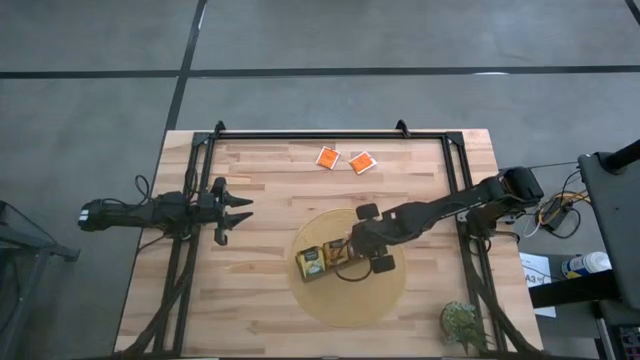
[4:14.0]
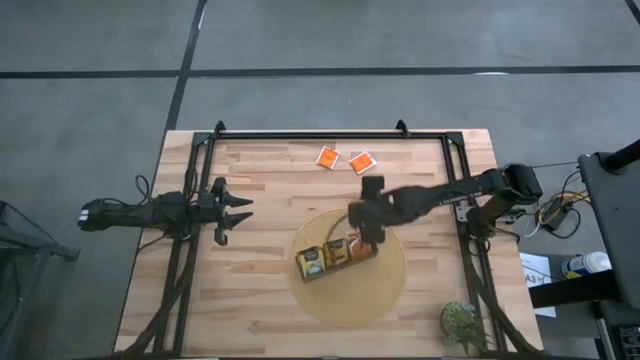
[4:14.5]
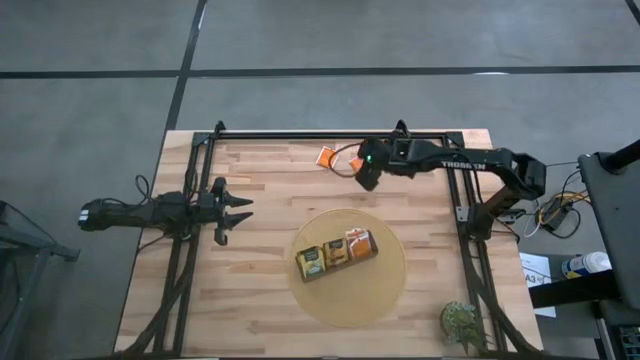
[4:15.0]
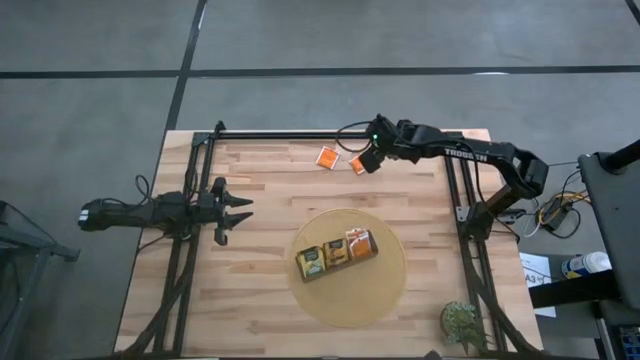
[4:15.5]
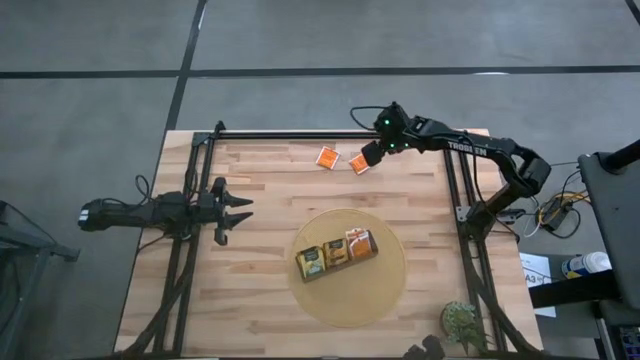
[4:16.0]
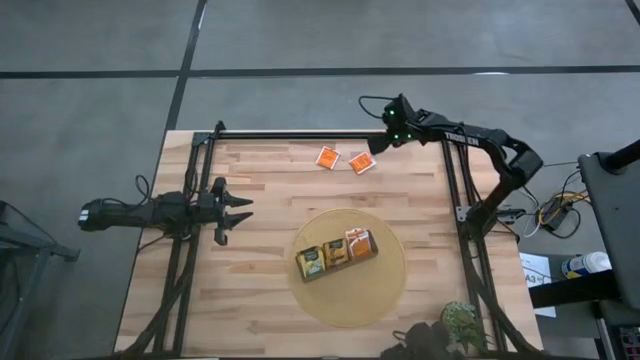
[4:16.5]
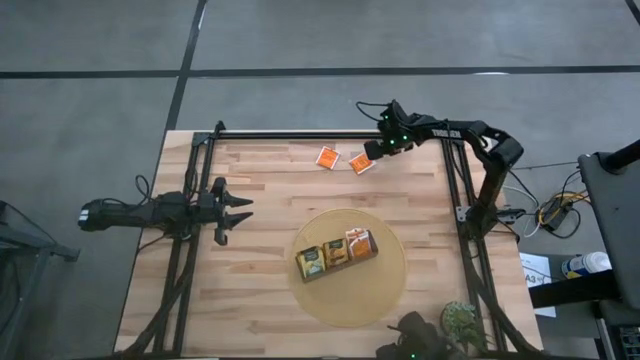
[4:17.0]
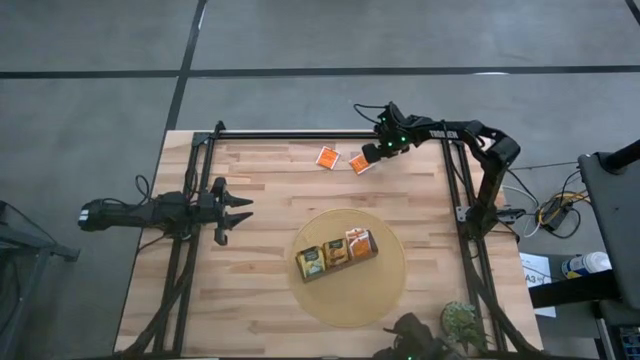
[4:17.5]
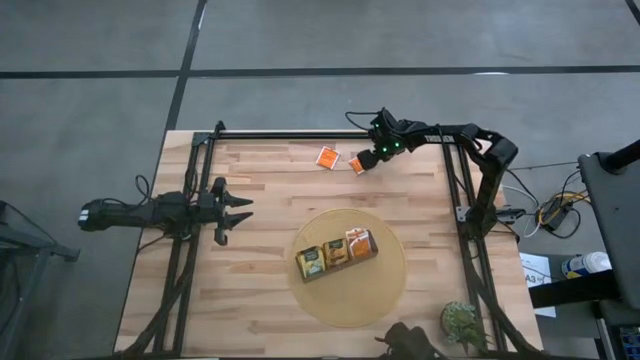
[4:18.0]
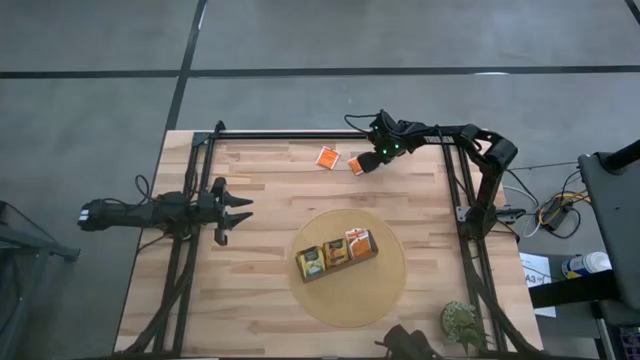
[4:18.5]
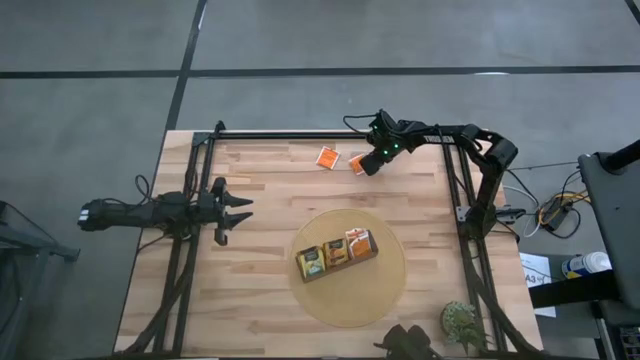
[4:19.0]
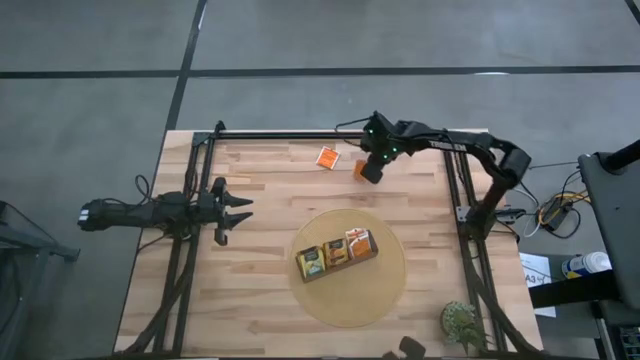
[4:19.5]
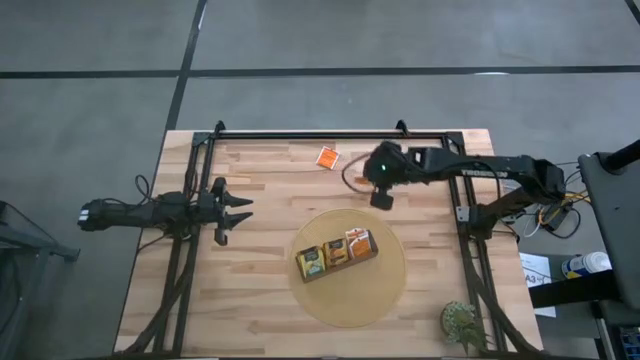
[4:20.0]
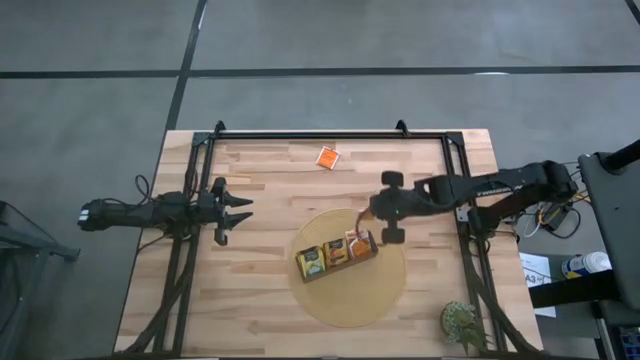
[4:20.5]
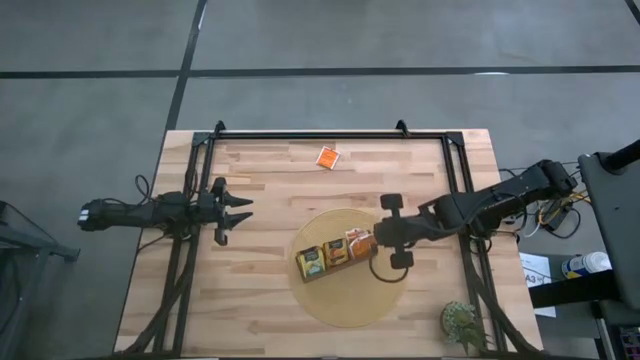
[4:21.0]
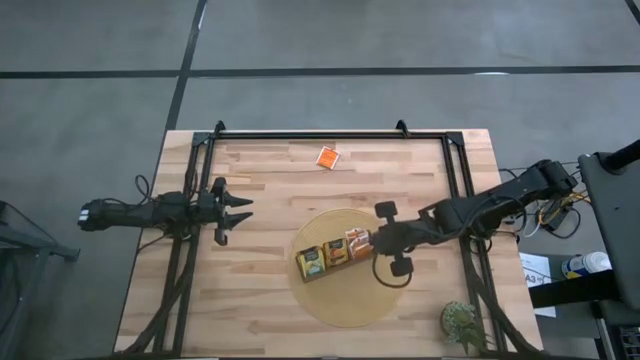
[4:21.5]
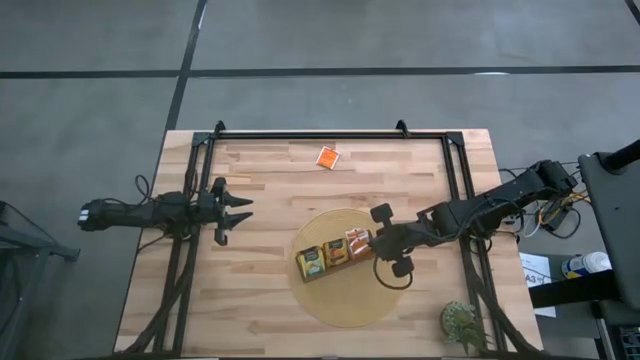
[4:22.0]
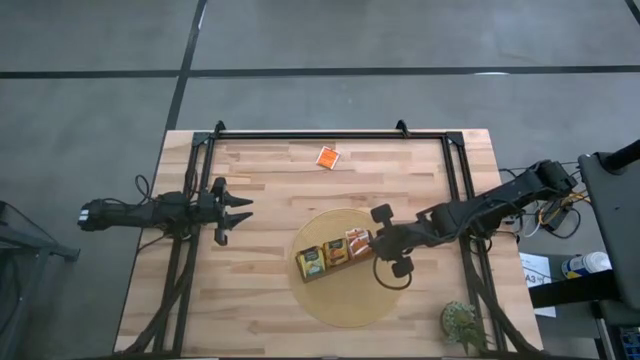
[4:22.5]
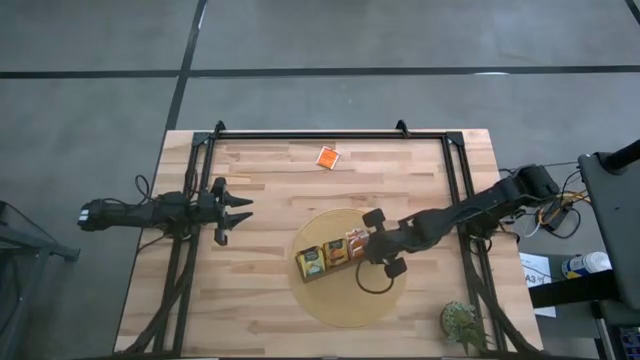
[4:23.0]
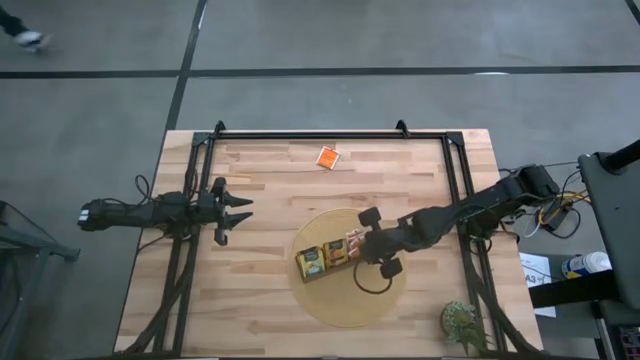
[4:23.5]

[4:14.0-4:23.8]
Task: Pick & Place Tea
Put the orange tea bag into the right section of the wooden organizer

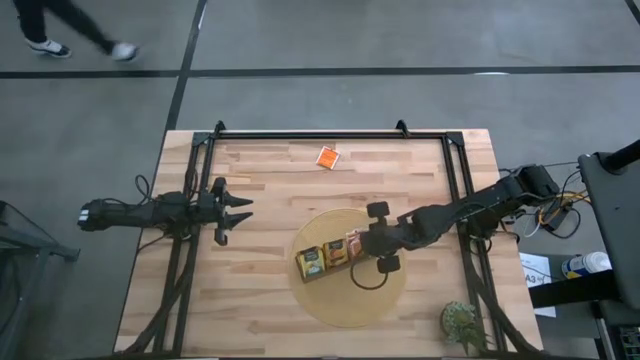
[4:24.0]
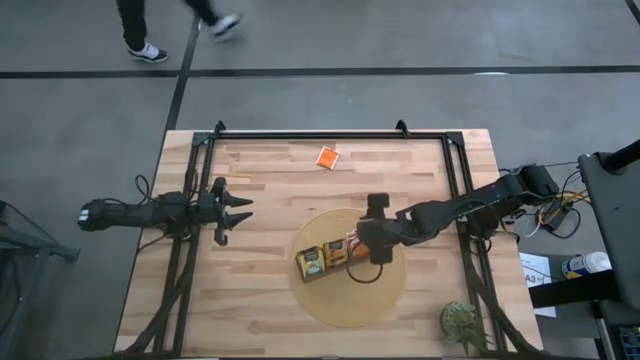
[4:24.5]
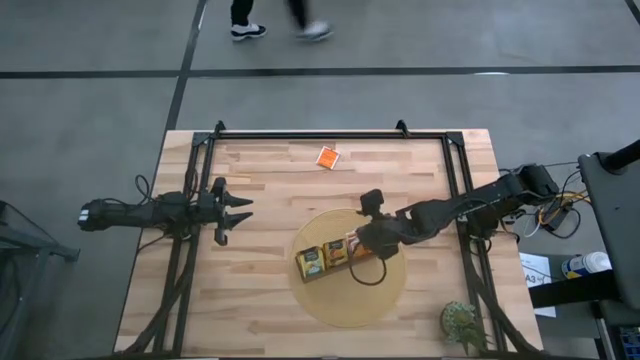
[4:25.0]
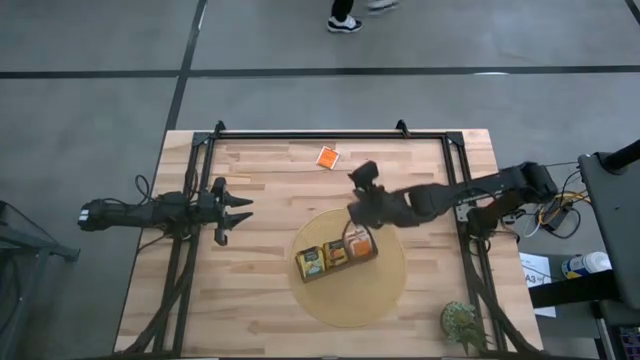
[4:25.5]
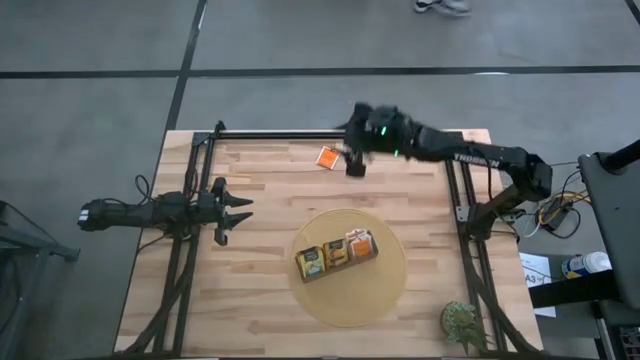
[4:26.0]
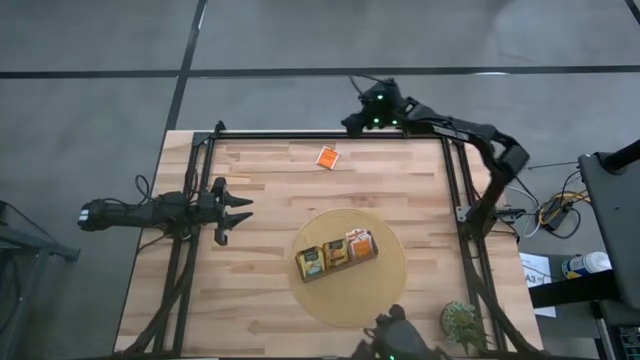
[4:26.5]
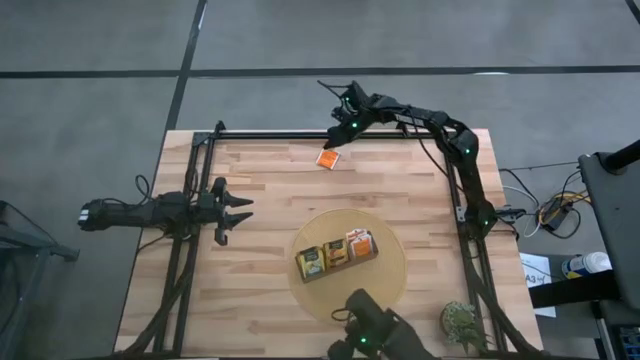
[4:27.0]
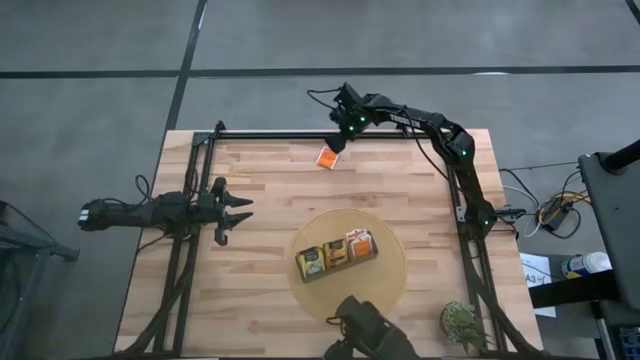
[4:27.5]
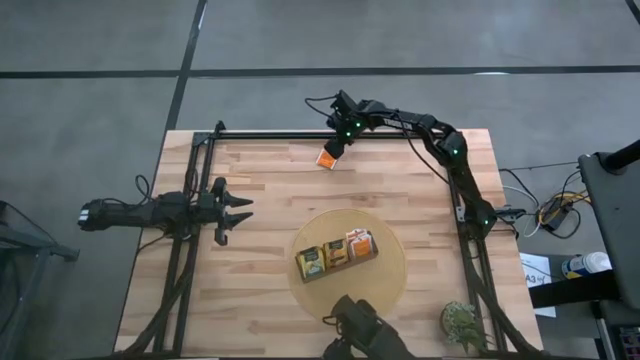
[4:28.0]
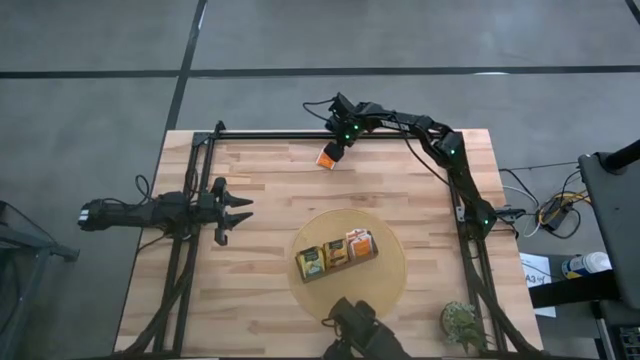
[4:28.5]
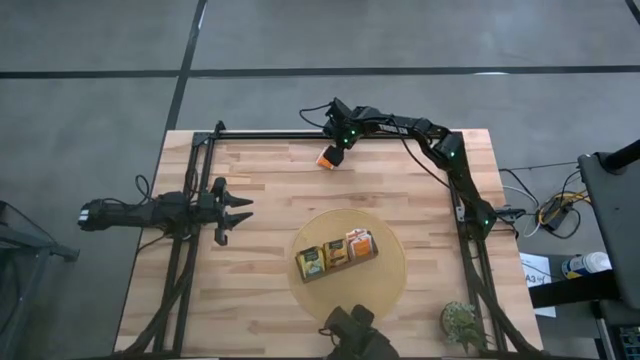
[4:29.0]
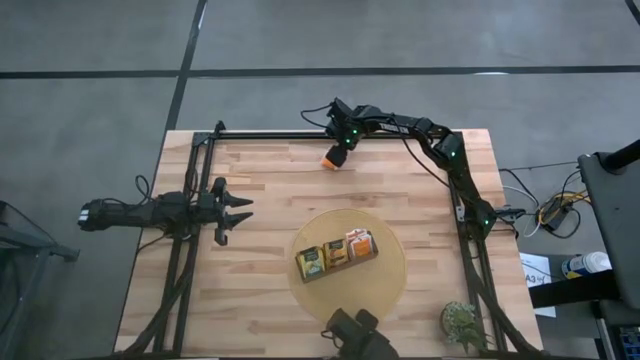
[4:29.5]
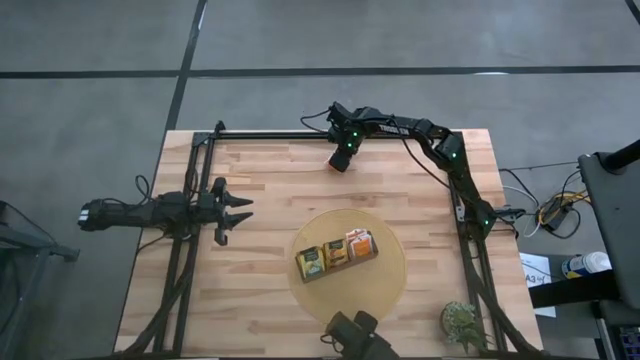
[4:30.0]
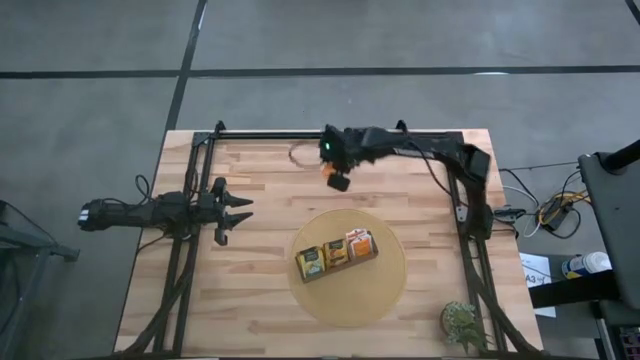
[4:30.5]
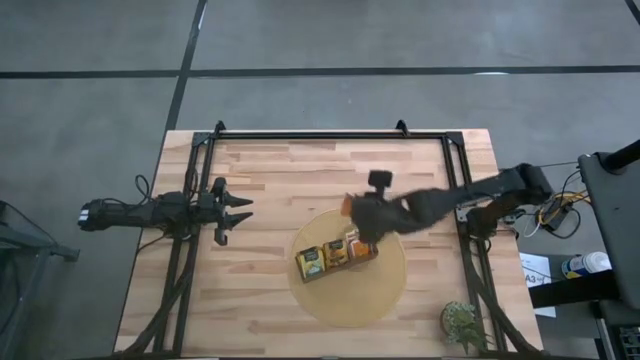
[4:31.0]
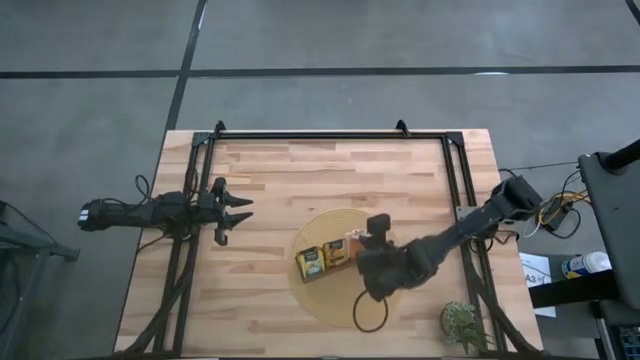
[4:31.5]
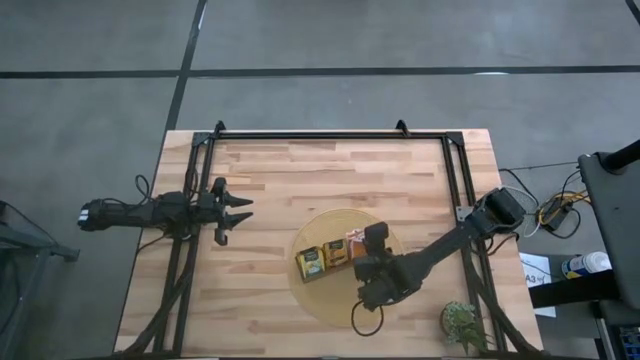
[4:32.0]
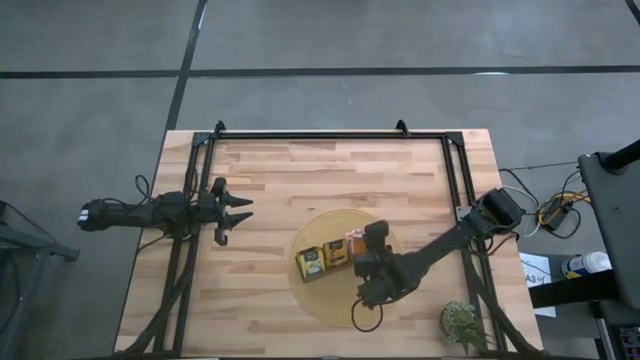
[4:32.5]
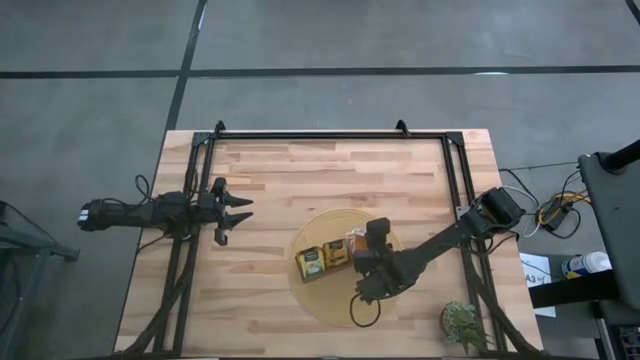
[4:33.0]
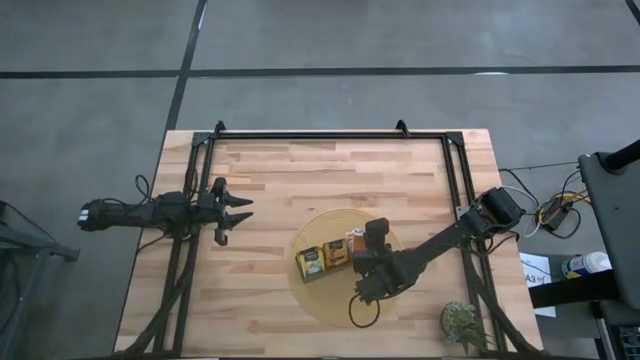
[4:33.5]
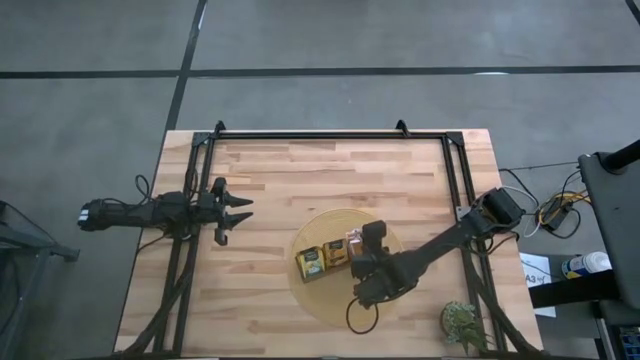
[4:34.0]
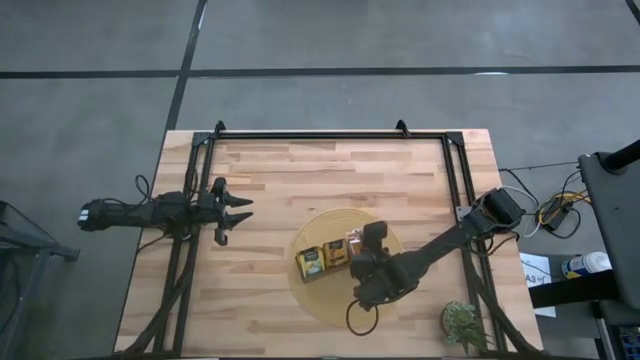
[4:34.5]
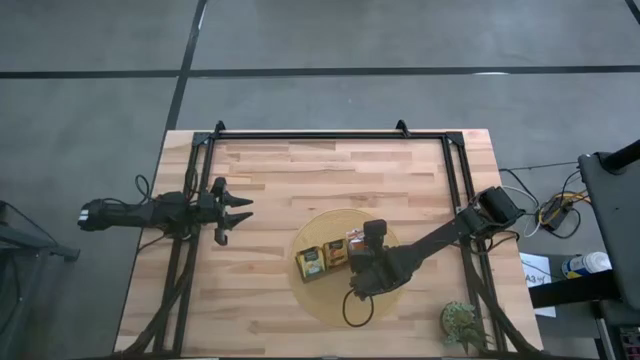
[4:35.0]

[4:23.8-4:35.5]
Put the orange tea bag into the right section of the wooden organizer

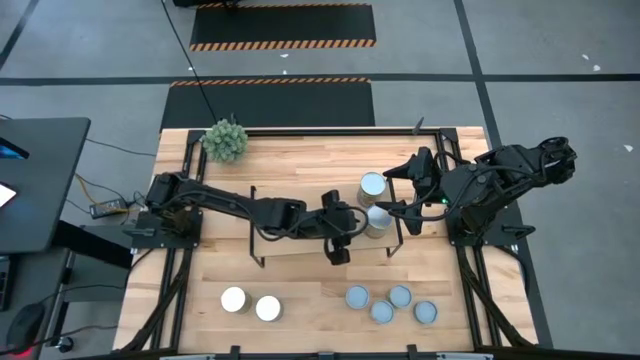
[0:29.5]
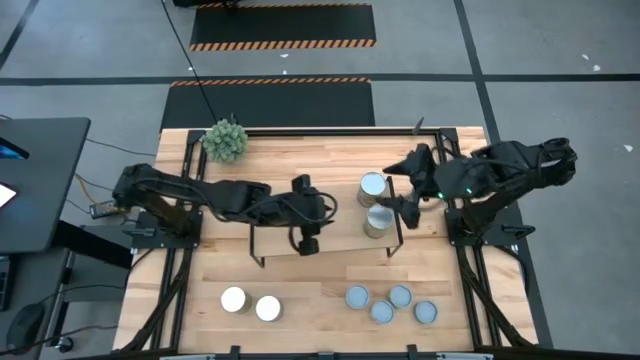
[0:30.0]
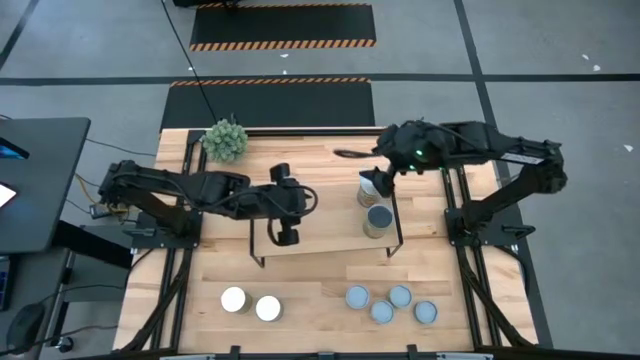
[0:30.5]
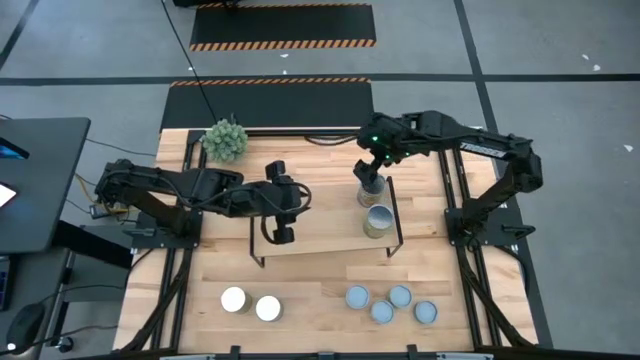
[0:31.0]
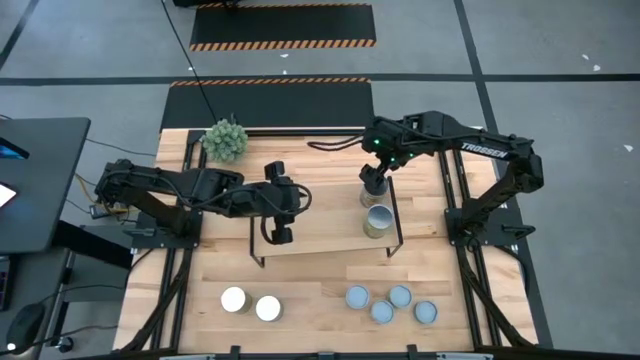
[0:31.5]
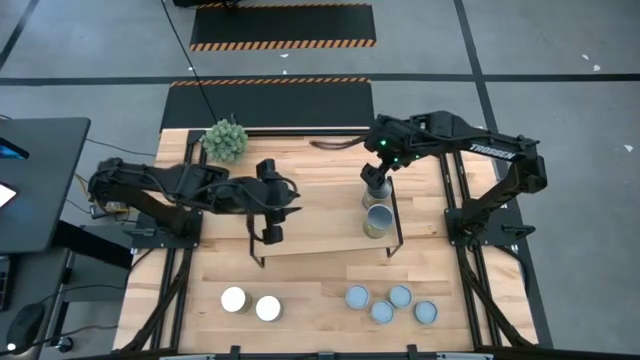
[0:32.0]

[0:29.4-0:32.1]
Task: Pick and place cans onto a shelf
Adjust the canned peaches on the shelf
